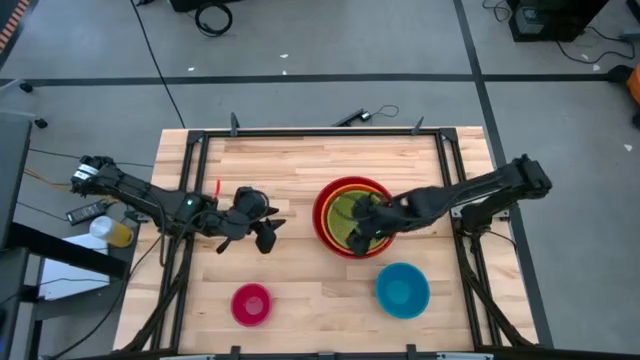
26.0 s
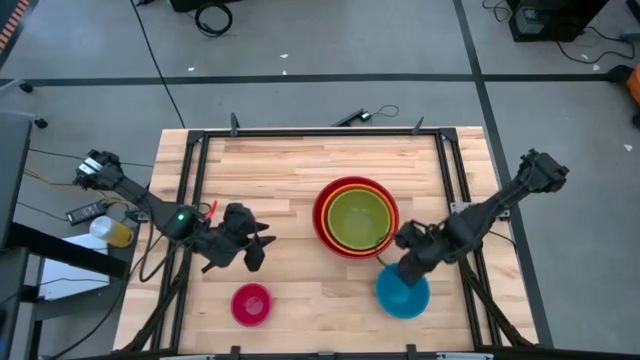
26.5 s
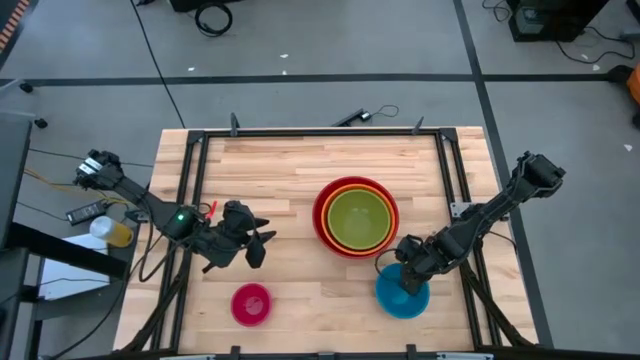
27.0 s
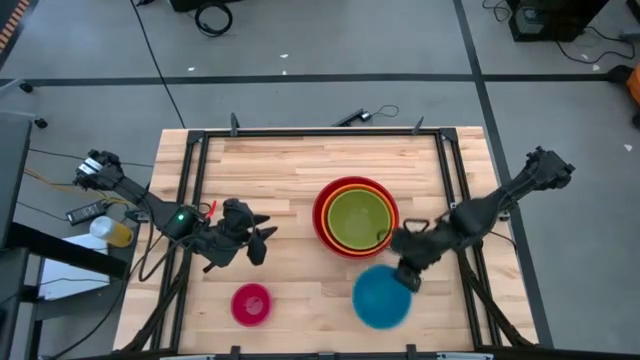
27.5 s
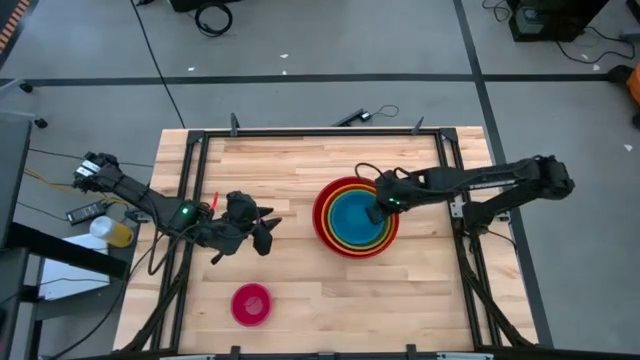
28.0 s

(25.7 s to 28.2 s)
Stack the blue bowl into the green bowl

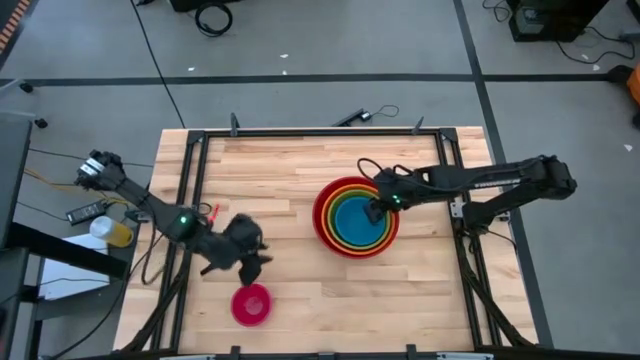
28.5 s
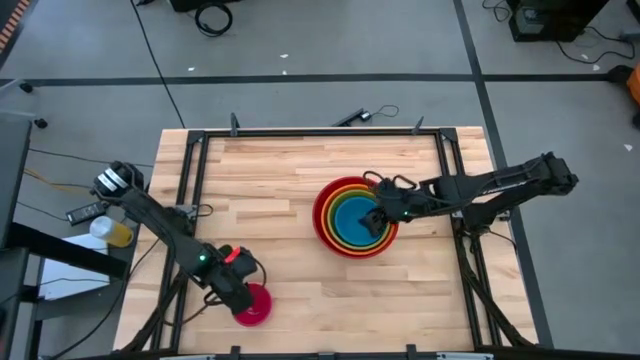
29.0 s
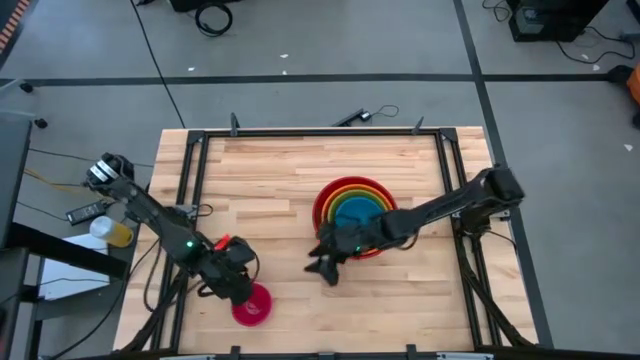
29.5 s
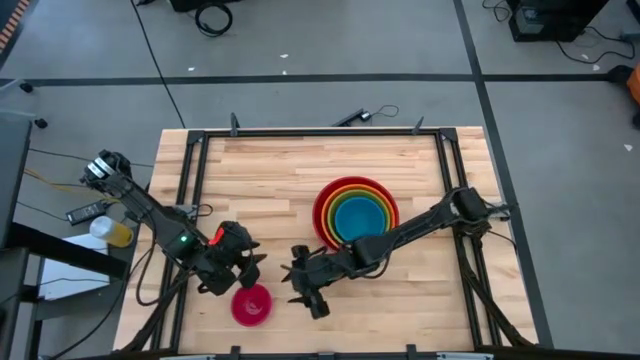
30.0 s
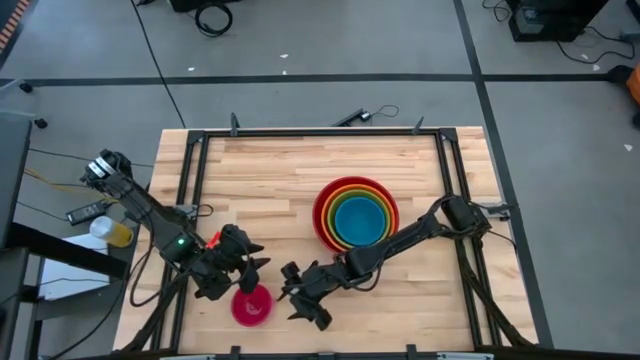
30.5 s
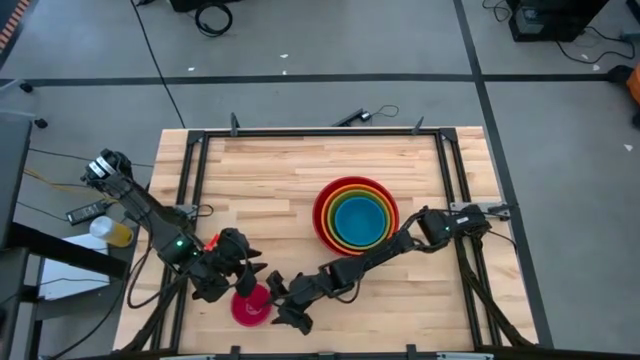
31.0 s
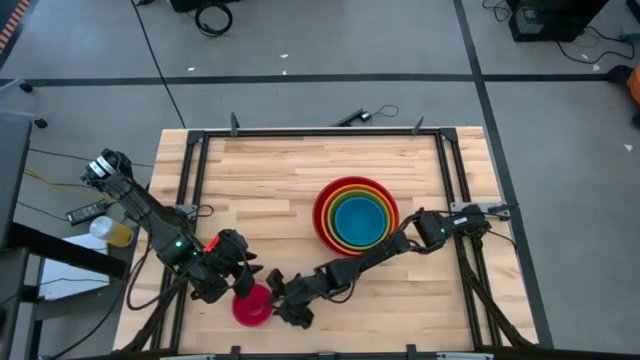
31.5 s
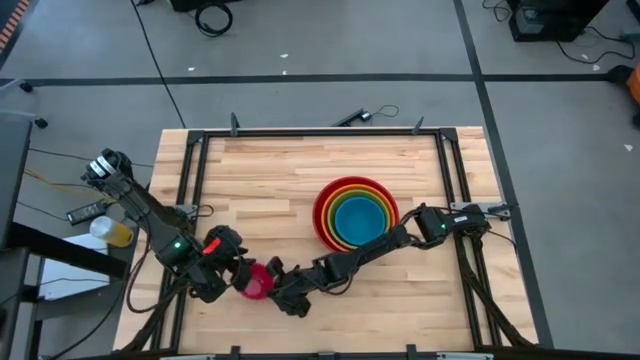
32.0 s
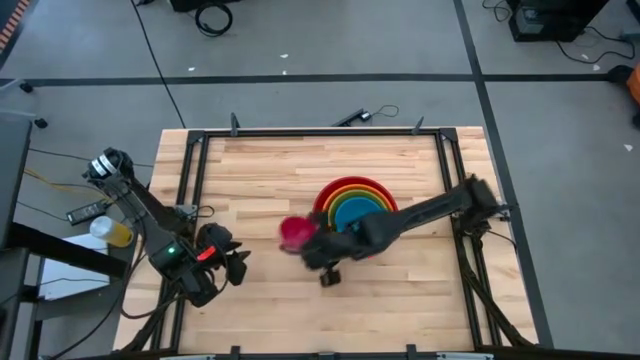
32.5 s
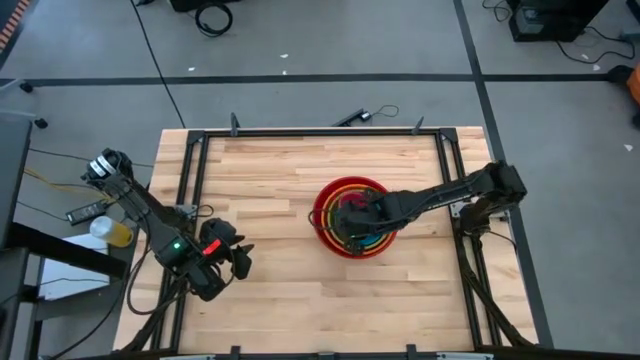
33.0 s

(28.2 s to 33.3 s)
Stack the pink bowl into the blue bowl

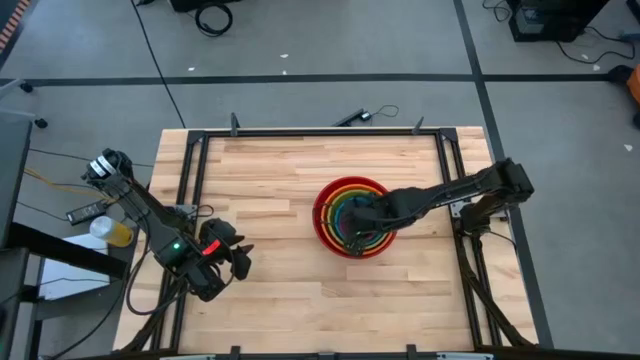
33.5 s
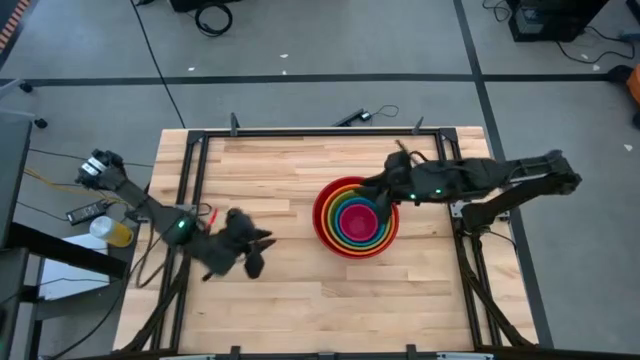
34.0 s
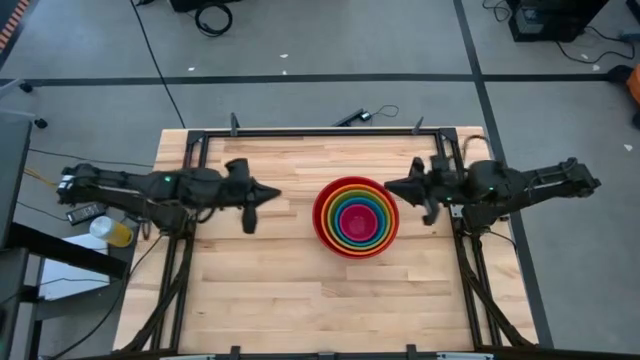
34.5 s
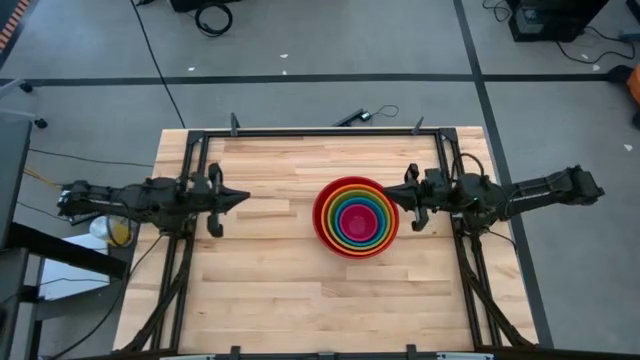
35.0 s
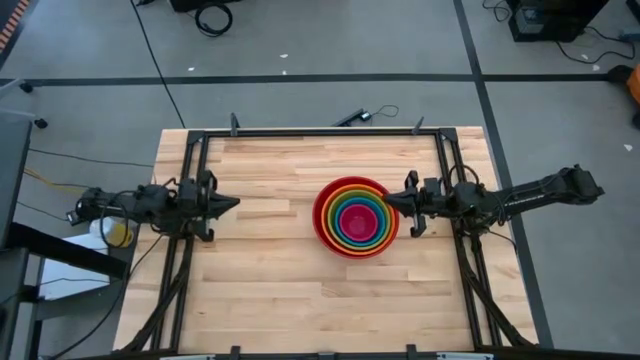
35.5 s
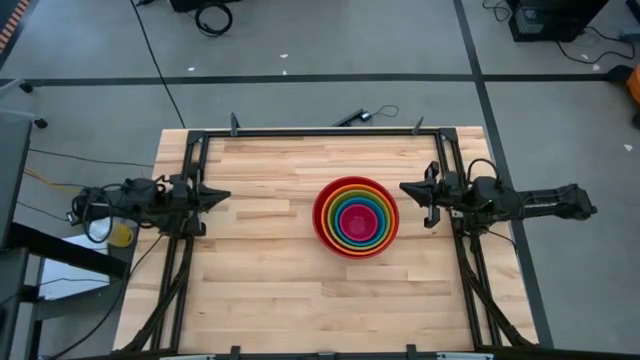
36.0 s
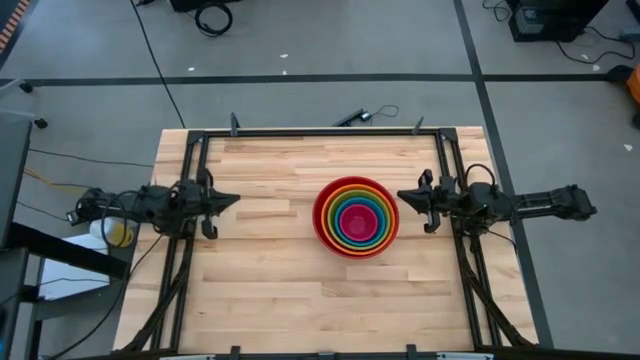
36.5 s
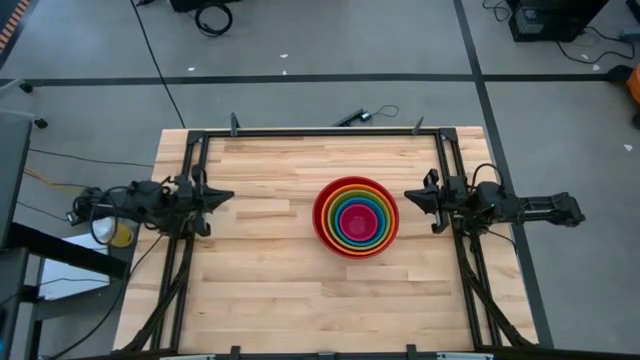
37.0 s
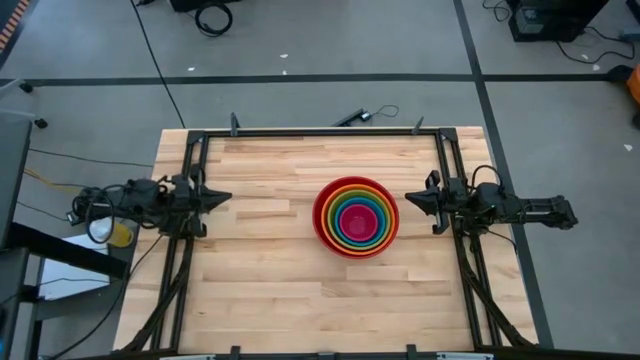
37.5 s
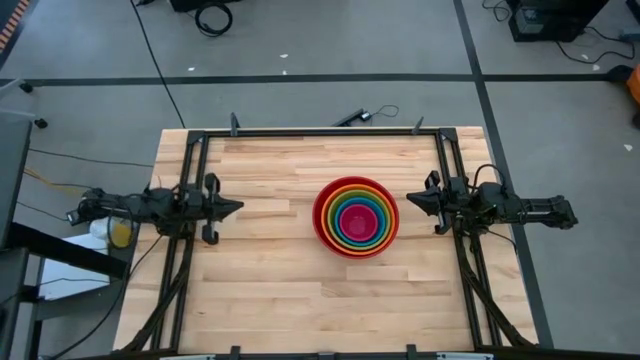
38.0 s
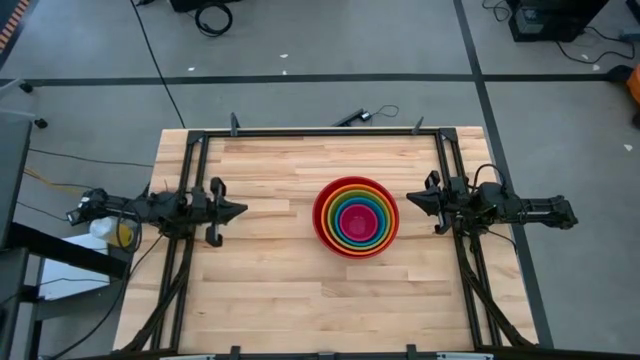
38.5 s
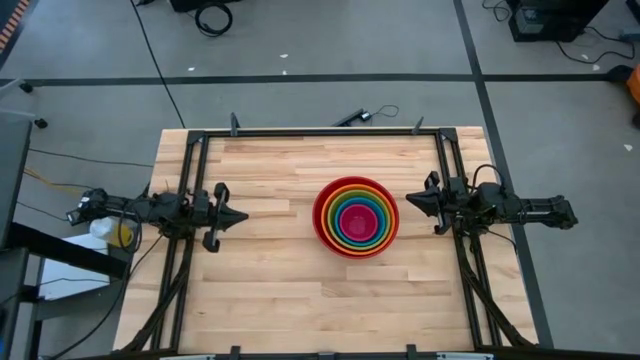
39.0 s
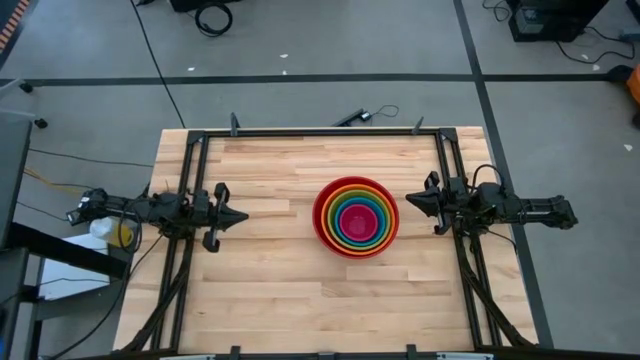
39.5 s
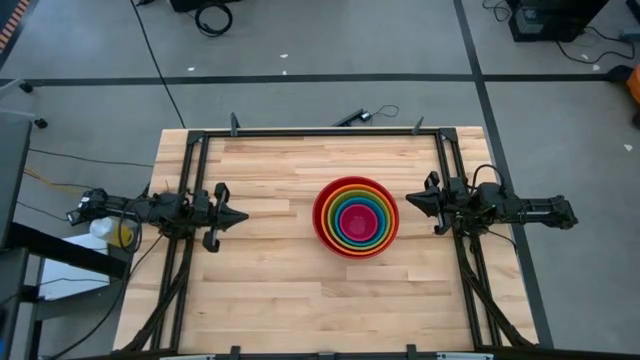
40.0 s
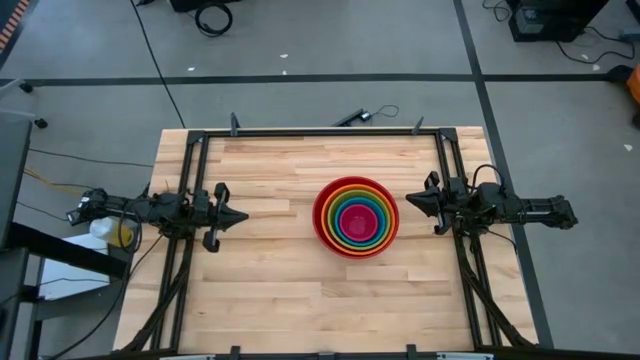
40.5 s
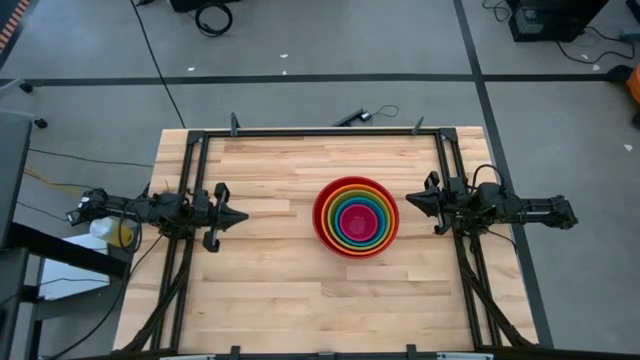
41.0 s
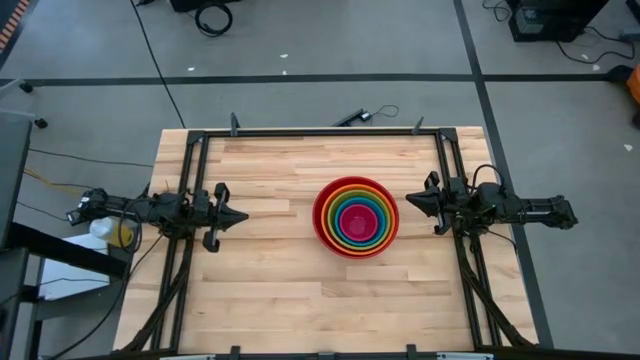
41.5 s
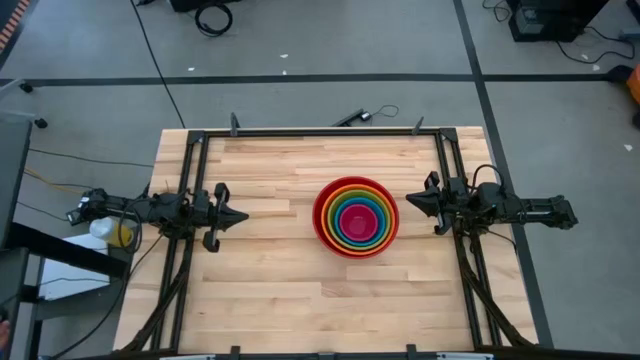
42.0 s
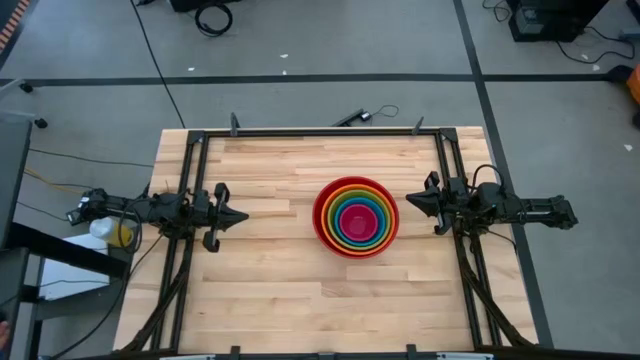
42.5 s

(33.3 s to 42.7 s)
Return to Home Position
